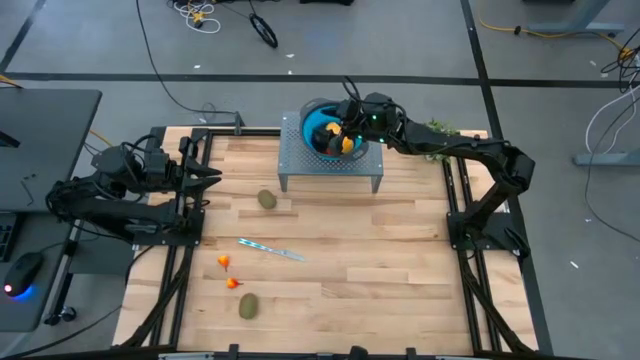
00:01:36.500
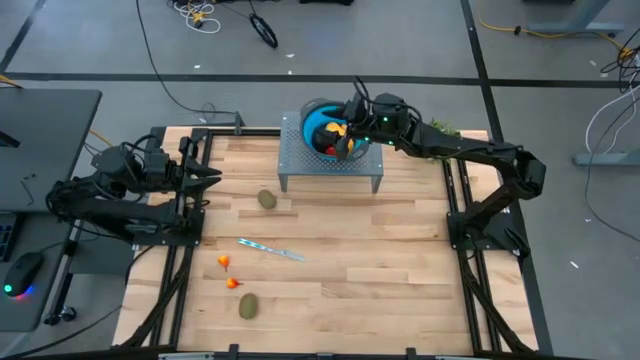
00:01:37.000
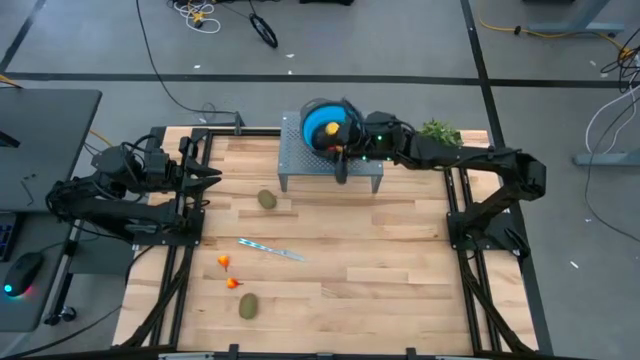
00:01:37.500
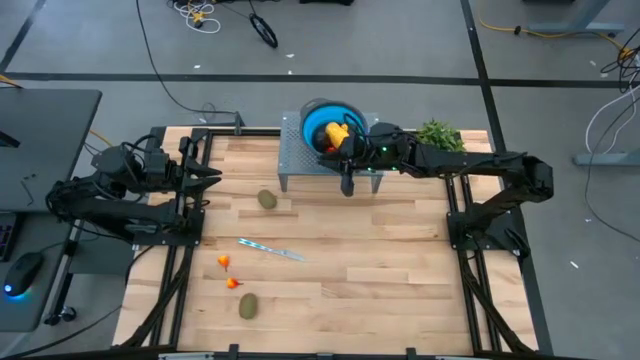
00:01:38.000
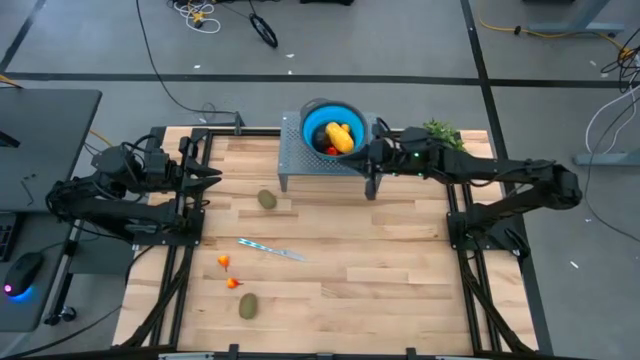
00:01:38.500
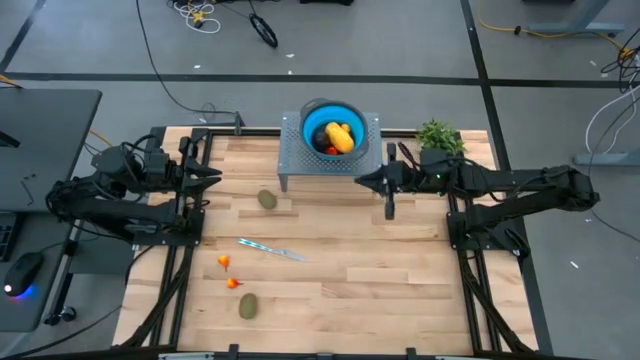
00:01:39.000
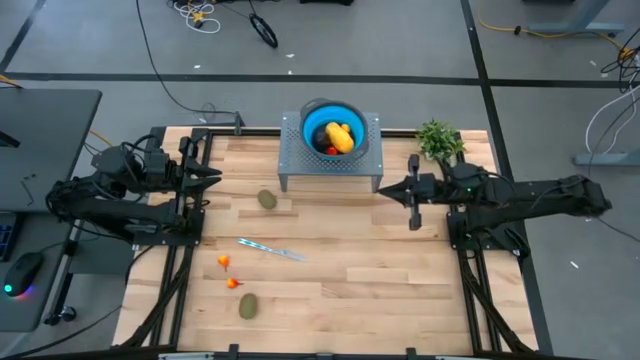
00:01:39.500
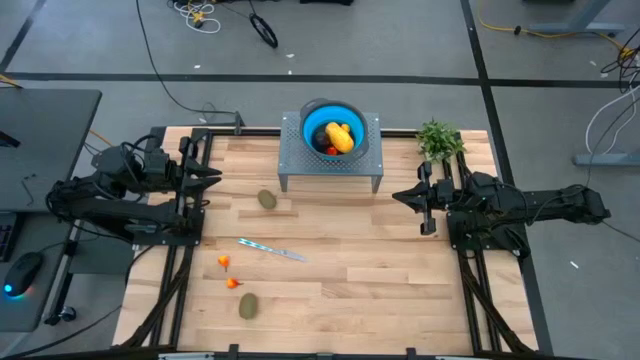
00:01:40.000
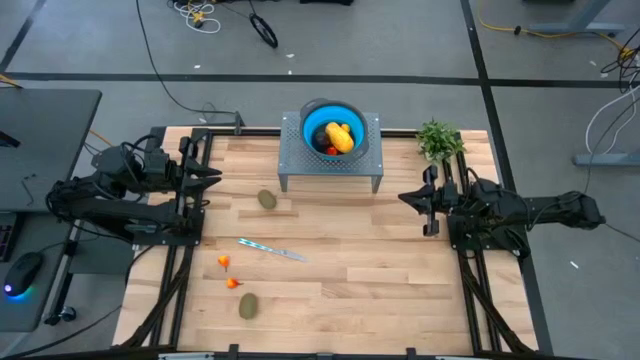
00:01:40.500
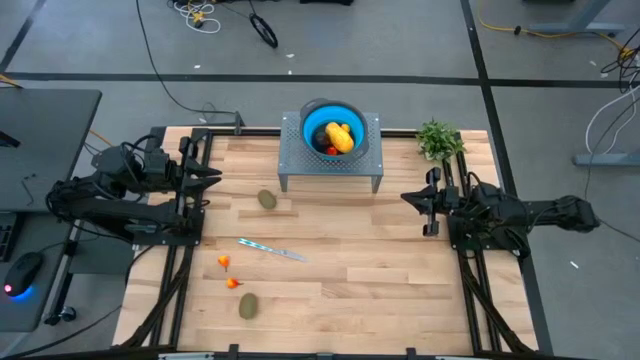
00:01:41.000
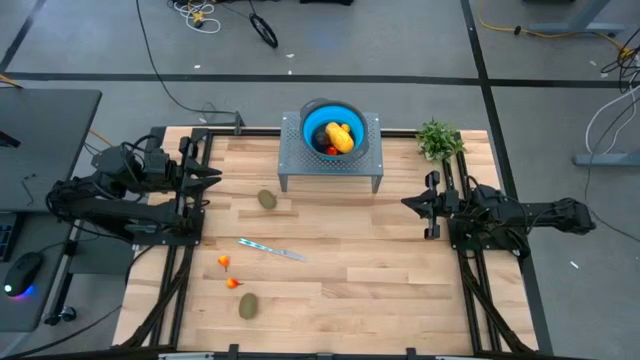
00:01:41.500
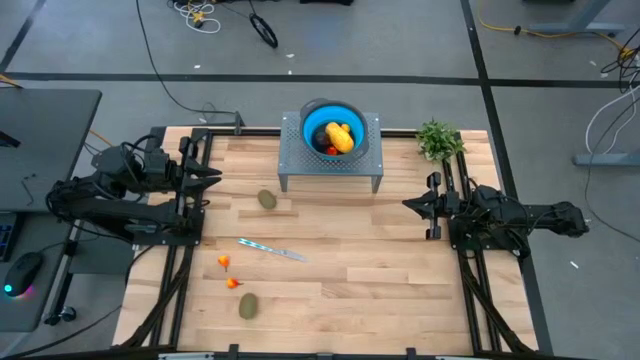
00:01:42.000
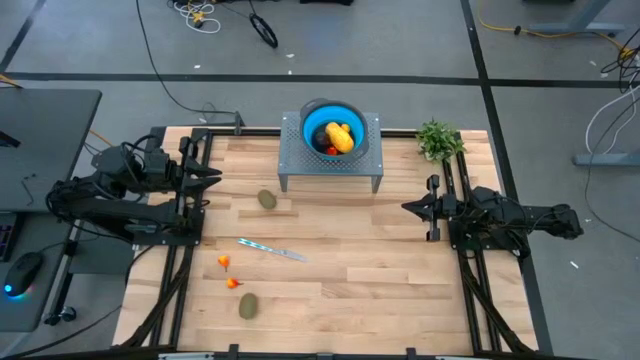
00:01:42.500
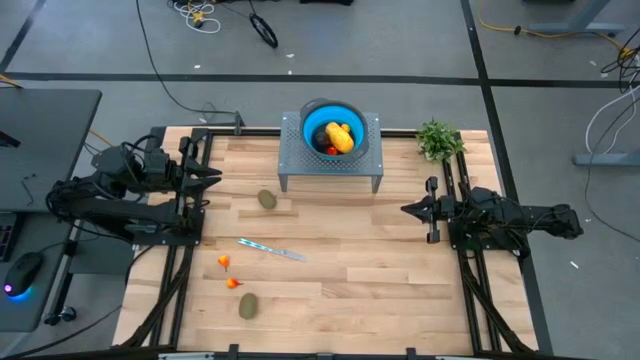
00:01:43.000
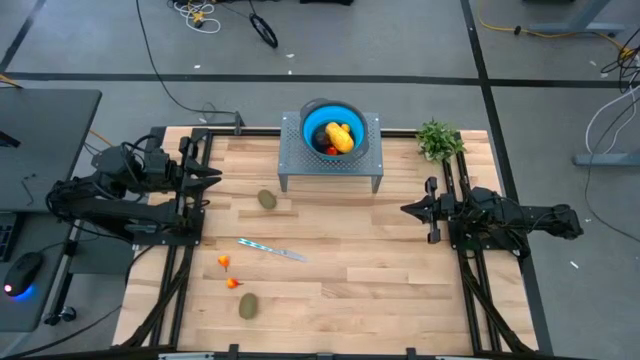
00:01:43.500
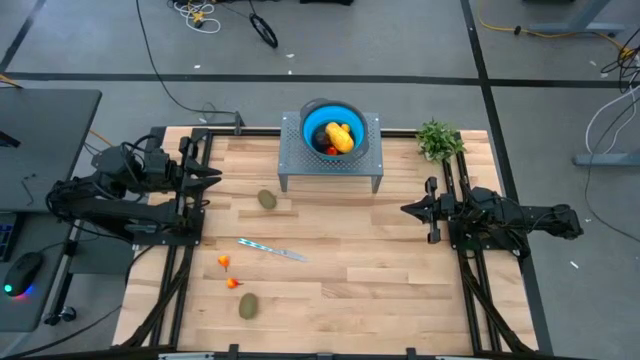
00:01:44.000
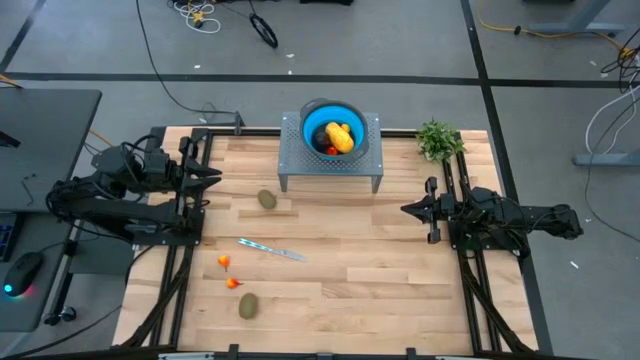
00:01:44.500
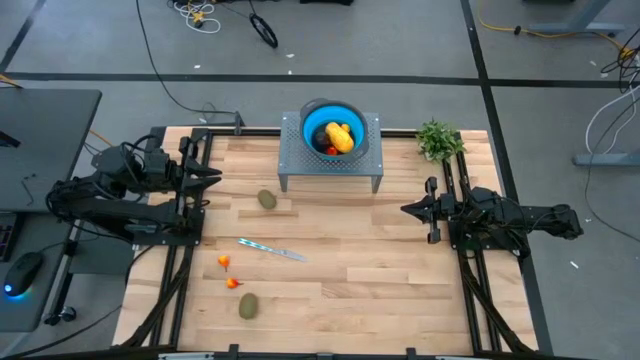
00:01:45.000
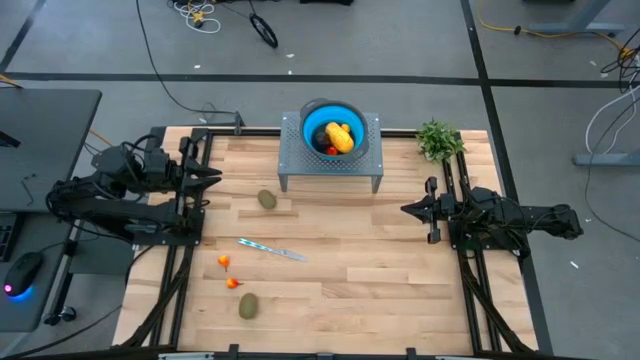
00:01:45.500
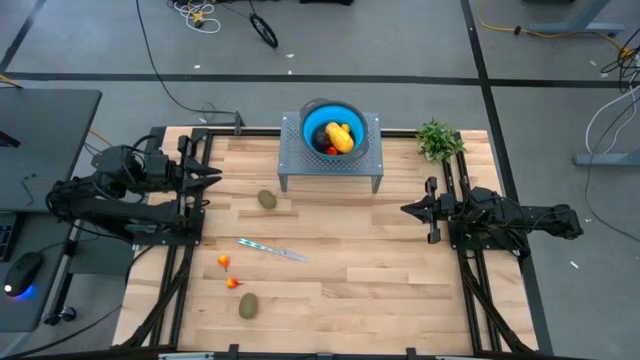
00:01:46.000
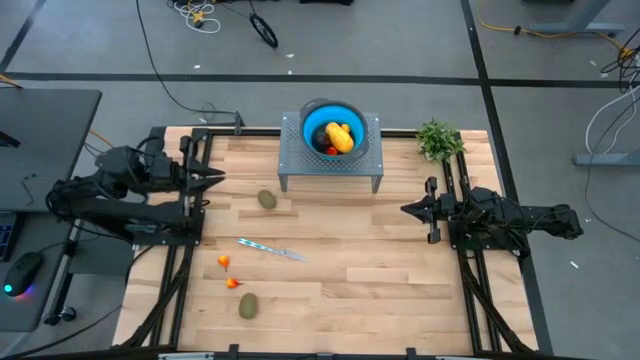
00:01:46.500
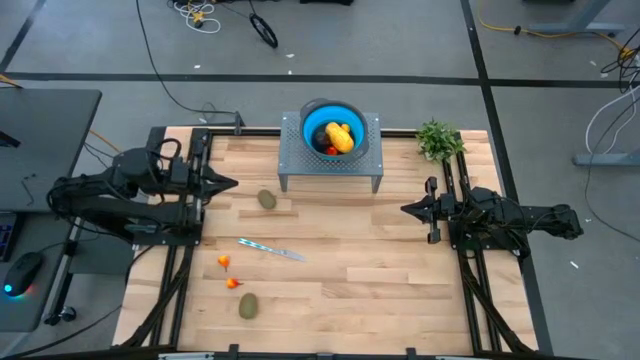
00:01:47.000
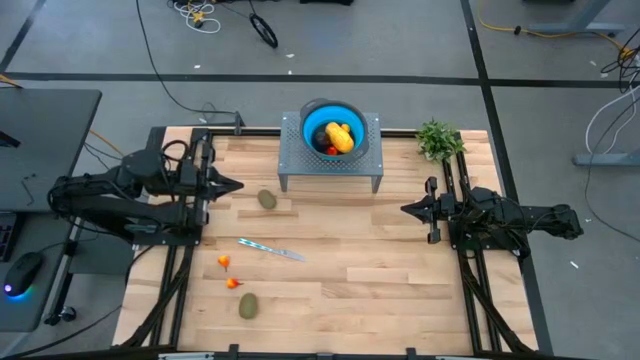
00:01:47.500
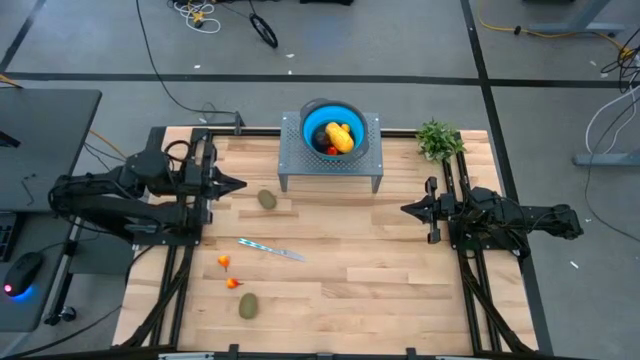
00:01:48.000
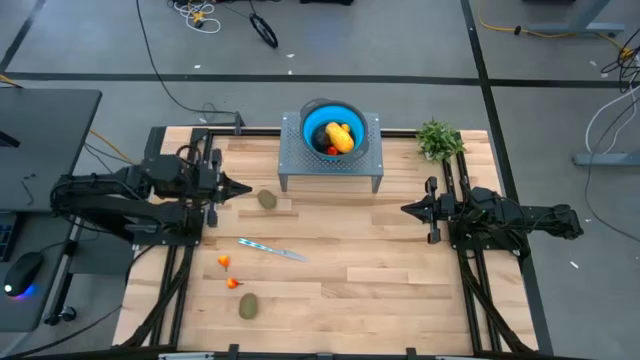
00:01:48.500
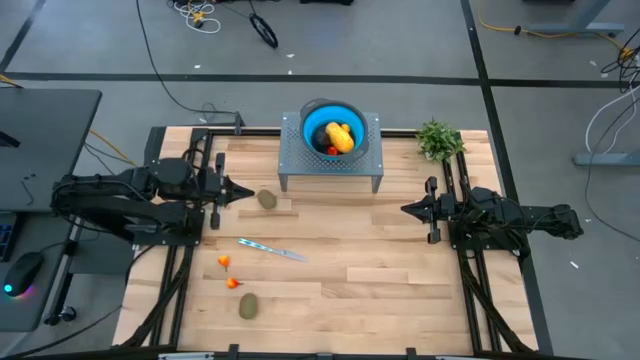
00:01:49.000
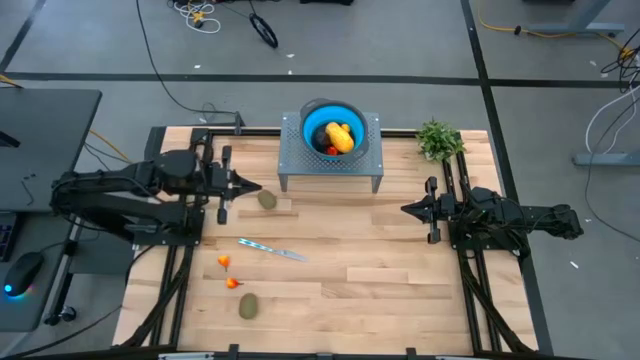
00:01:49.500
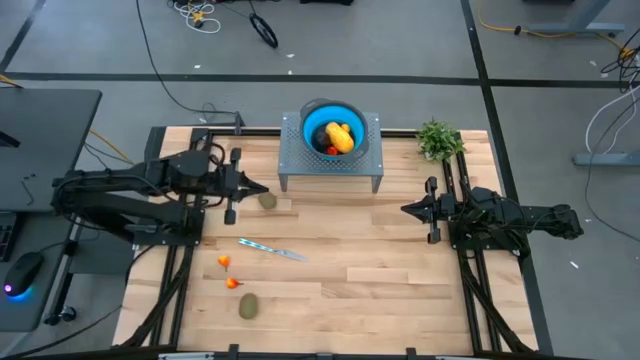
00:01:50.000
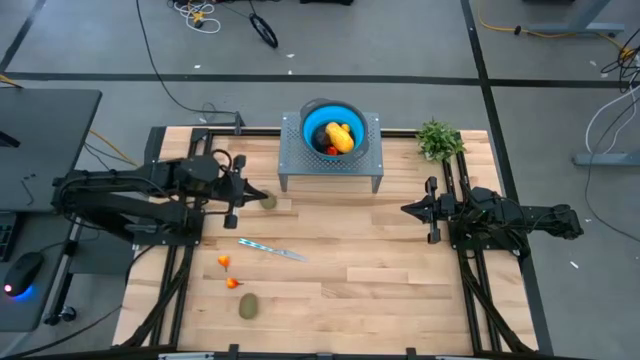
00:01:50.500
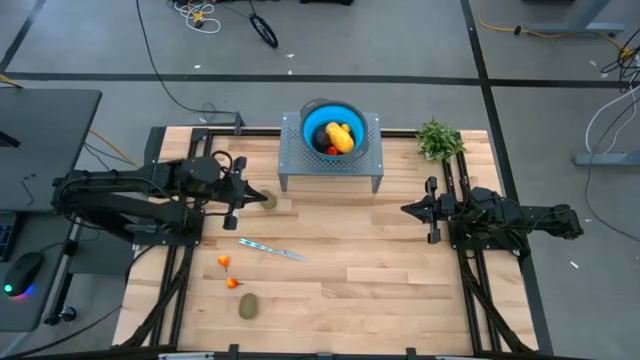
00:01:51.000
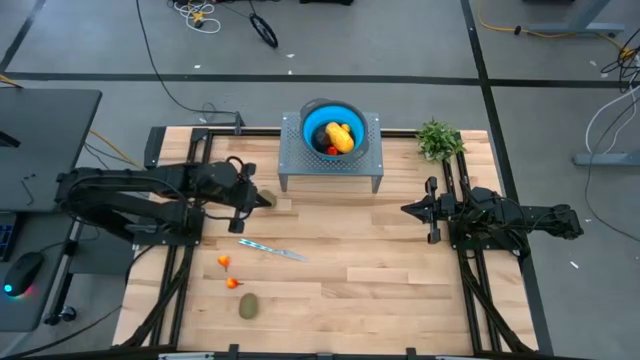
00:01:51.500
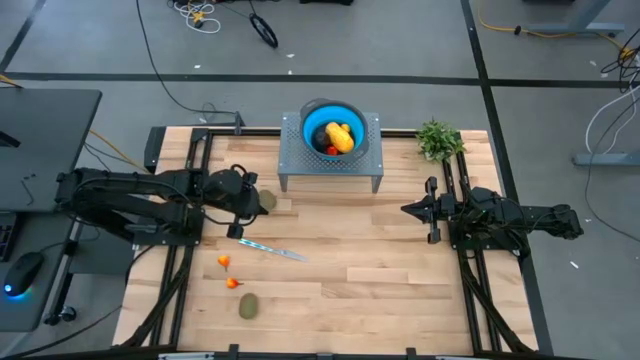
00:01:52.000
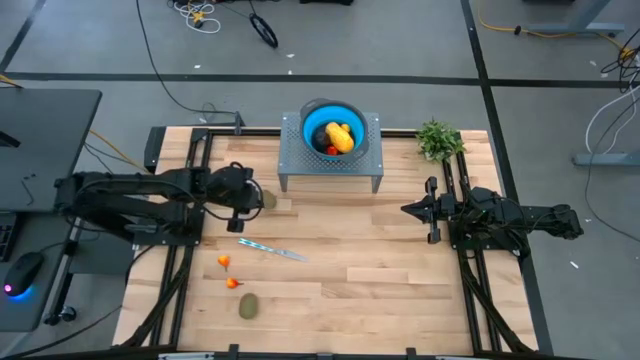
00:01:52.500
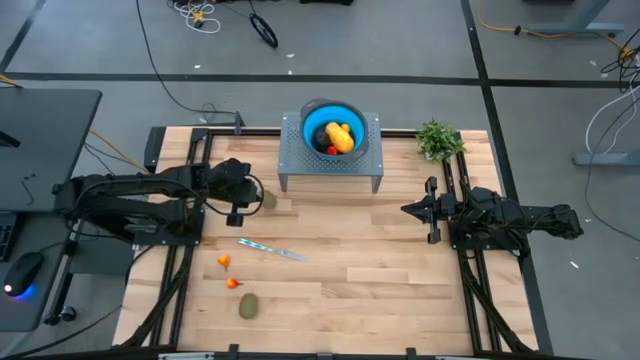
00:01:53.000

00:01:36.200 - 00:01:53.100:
Task: Pick & Place Fruit
Put the top kiwi into the blue bin
